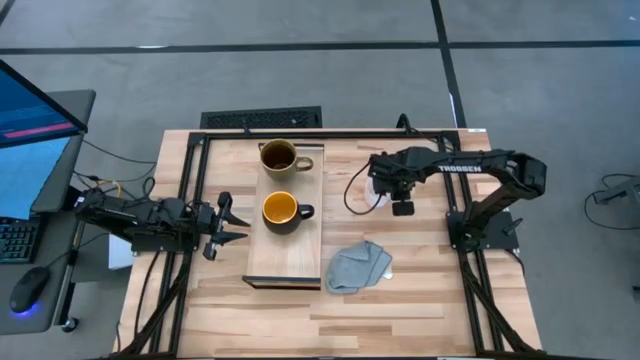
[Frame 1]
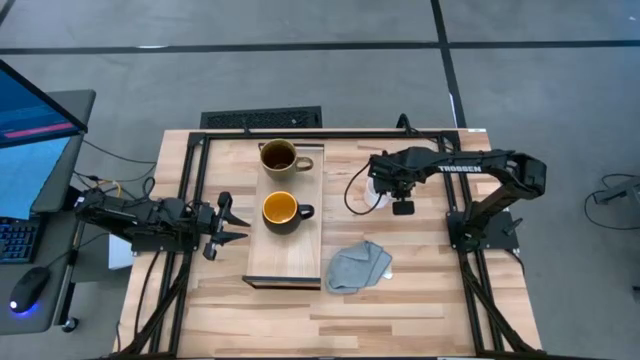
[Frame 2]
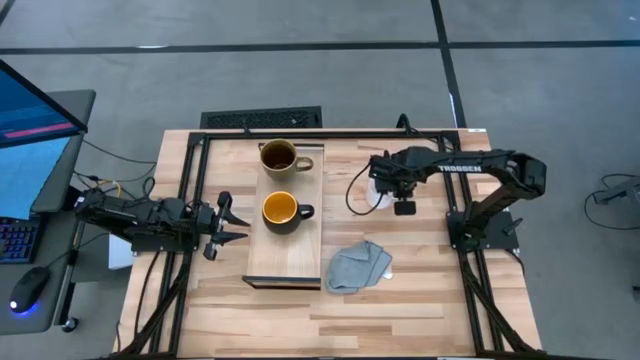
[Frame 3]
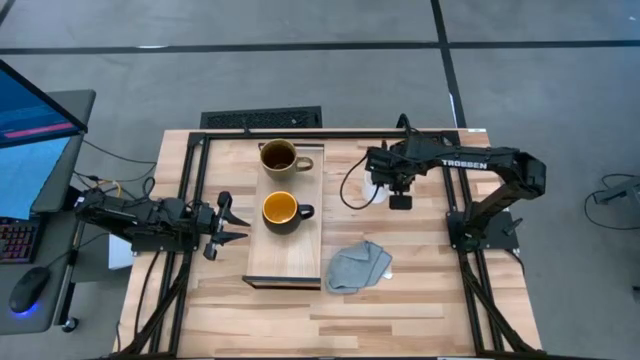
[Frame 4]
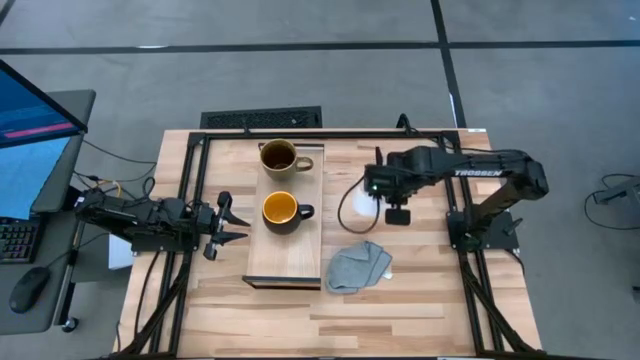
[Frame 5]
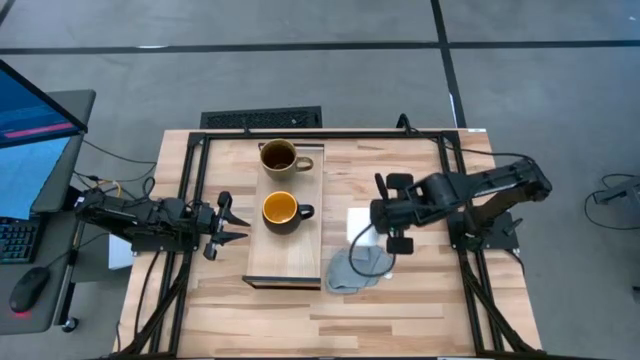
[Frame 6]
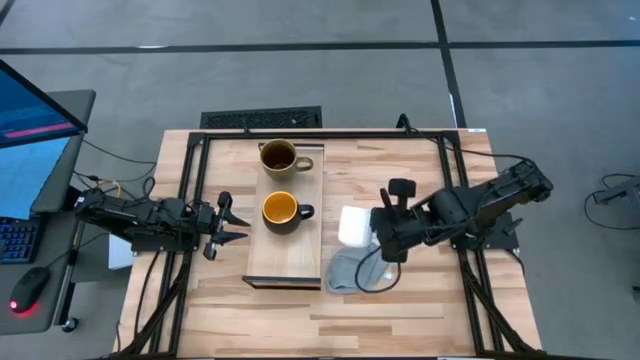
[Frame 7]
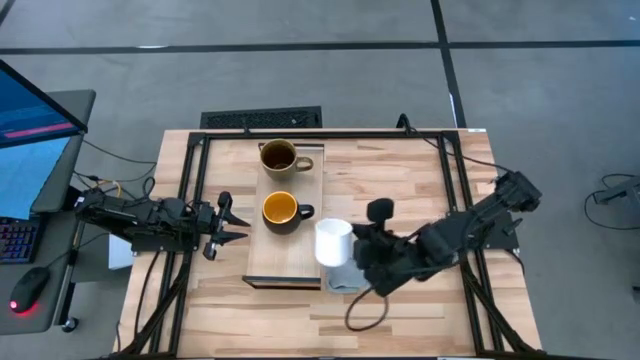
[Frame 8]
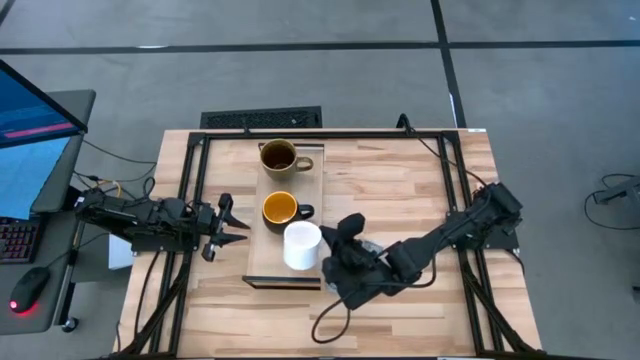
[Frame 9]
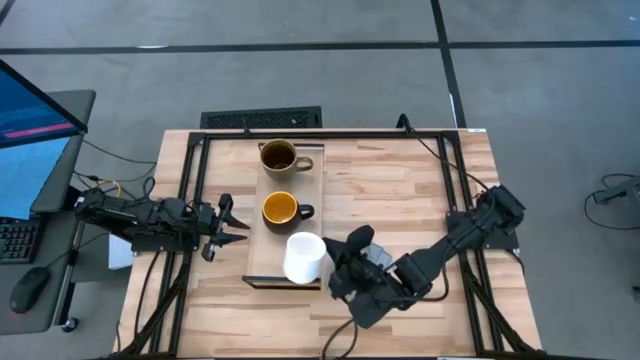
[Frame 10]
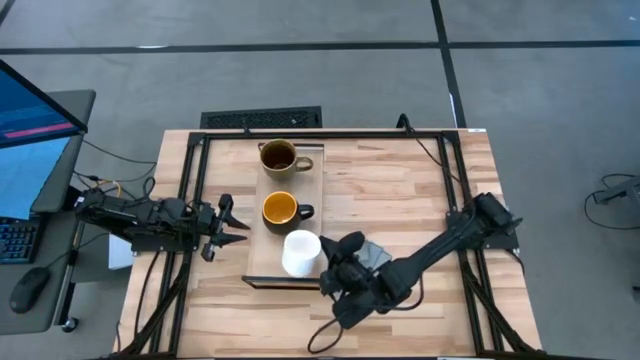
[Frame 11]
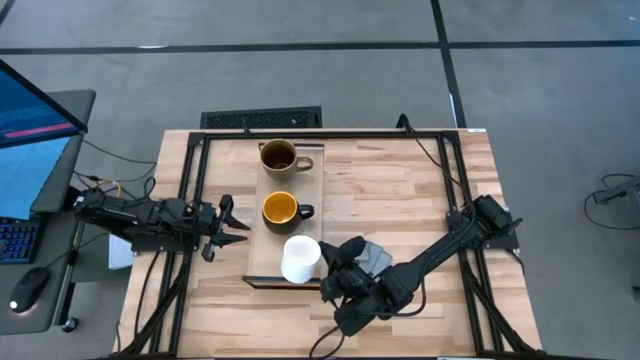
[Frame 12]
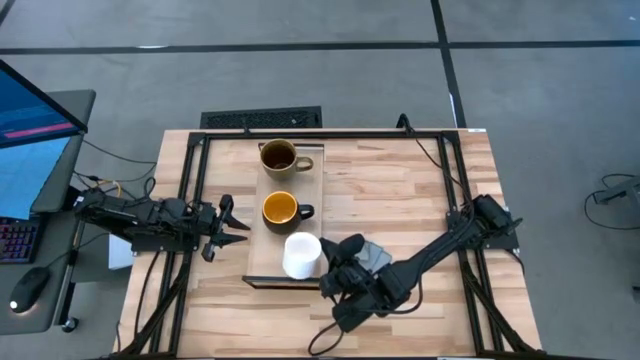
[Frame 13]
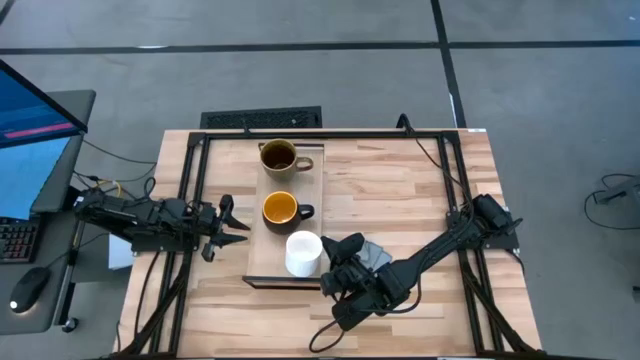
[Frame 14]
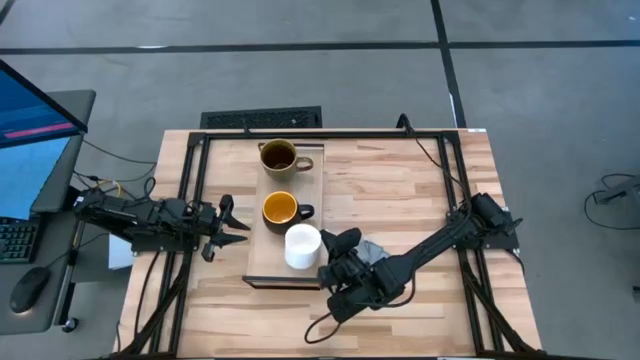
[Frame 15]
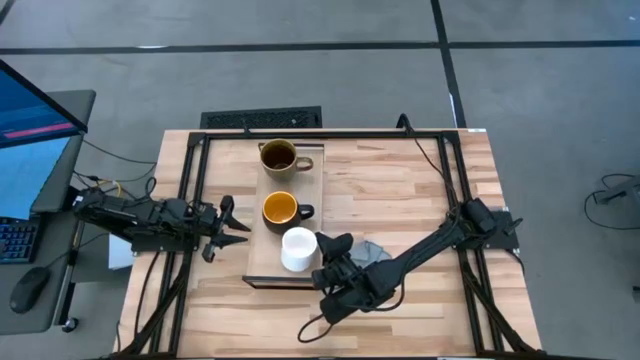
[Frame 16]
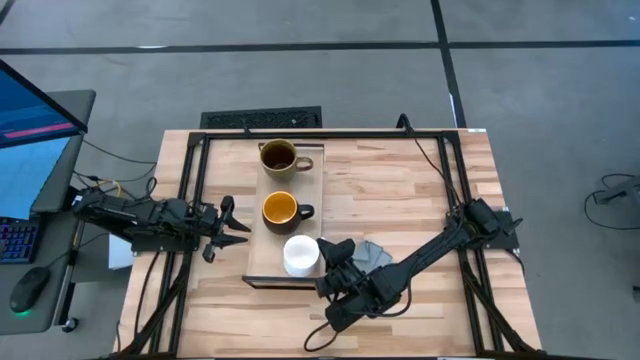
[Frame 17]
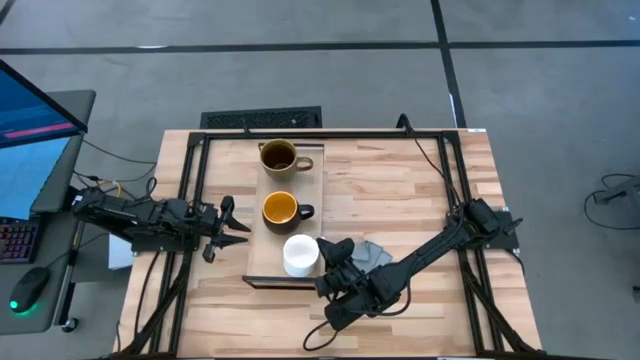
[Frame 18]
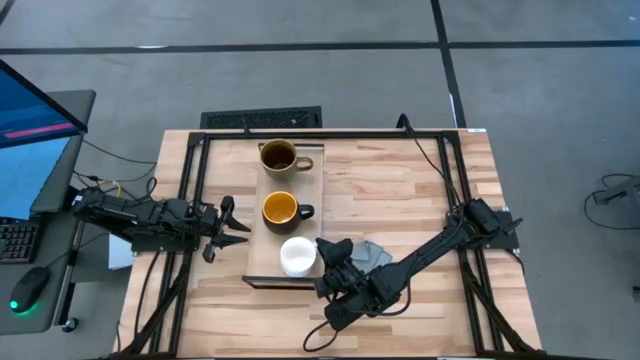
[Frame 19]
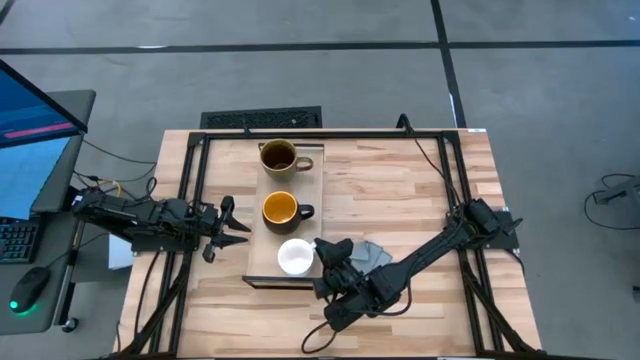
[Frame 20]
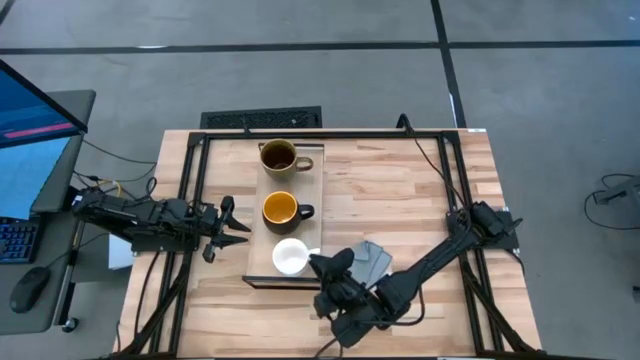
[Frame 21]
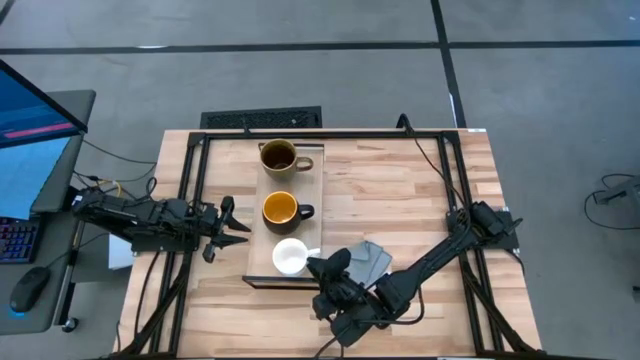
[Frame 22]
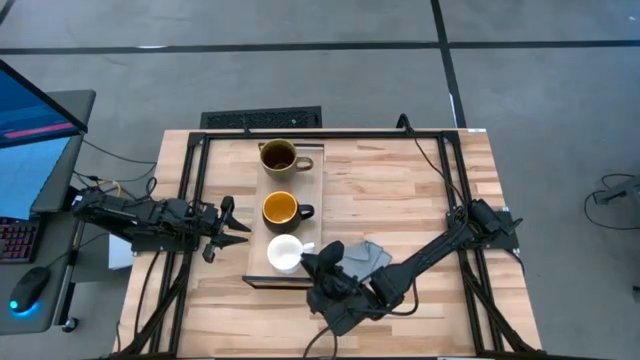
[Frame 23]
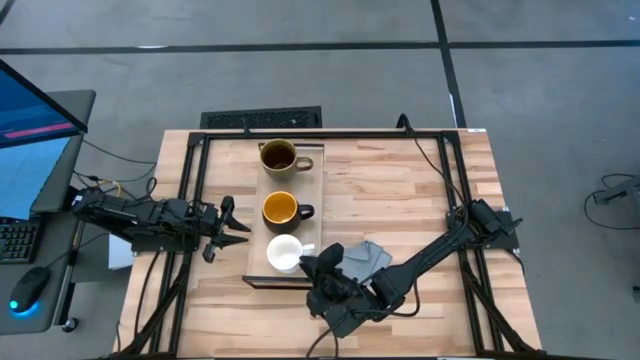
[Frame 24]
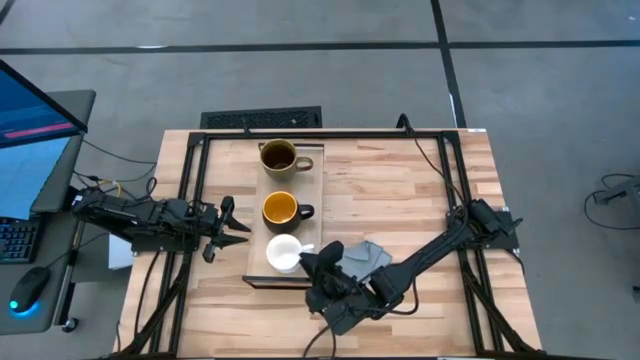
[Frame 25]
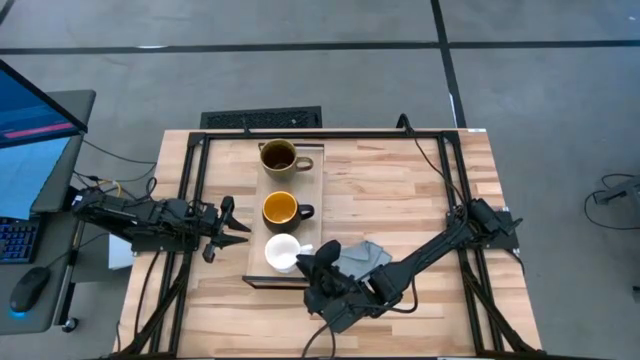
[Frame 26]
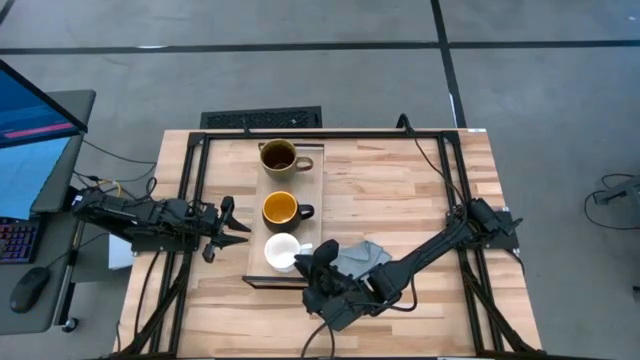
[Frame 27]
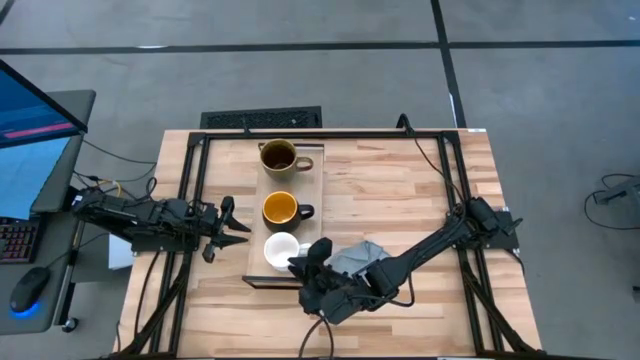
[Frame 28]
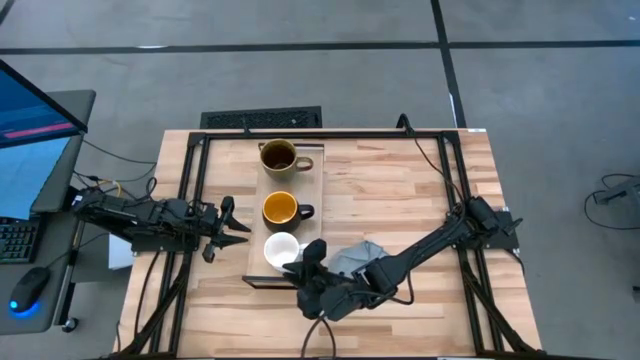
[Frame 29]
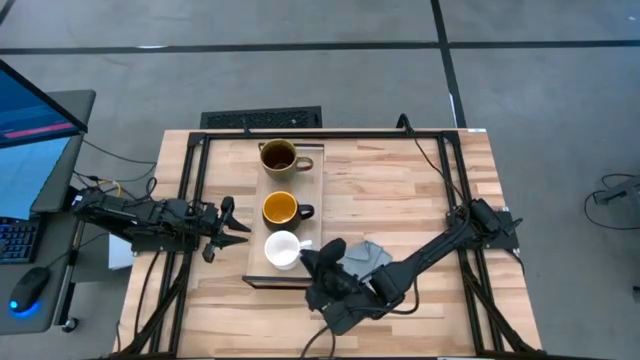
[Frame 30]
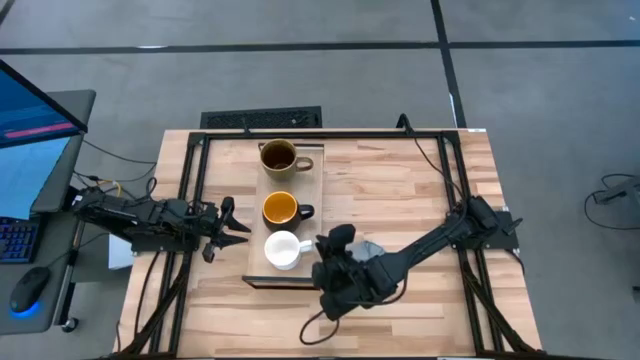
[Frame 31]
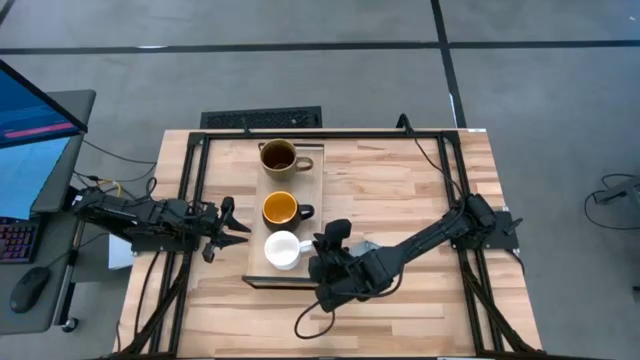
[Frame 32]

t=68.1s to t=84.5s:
Task: Stack small to large cups/mugs on shelf
Put the white mug on the shelf
